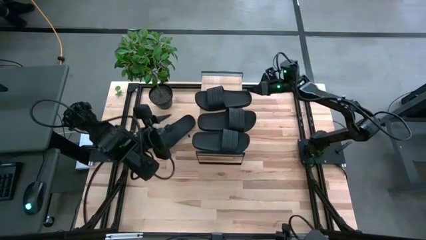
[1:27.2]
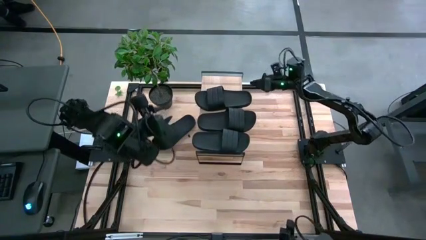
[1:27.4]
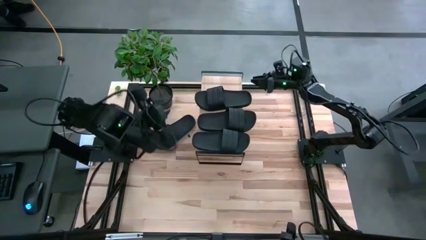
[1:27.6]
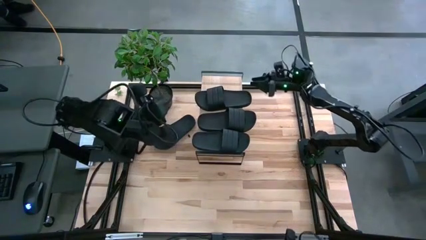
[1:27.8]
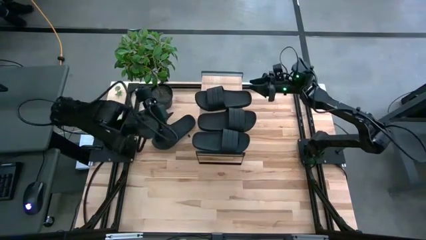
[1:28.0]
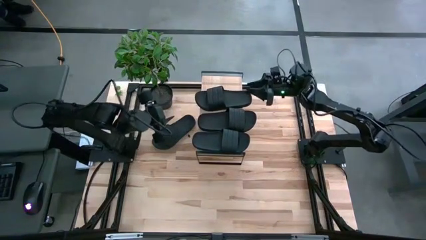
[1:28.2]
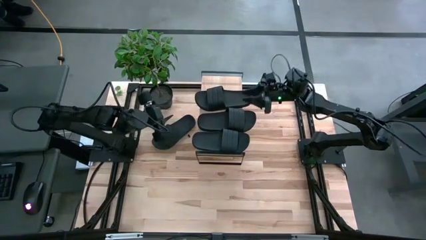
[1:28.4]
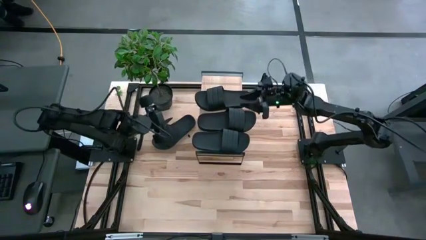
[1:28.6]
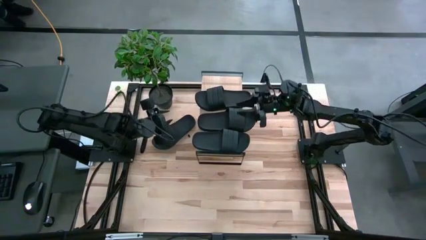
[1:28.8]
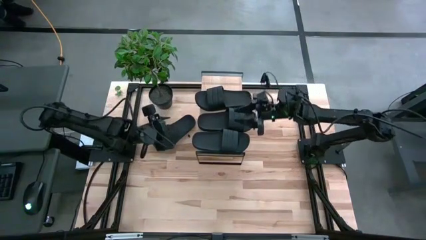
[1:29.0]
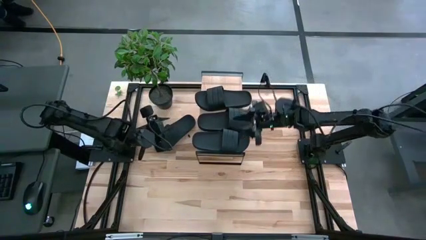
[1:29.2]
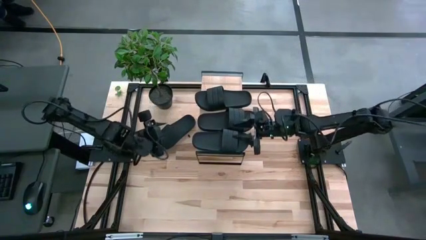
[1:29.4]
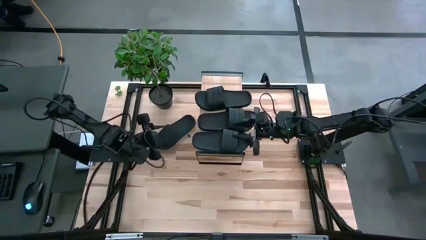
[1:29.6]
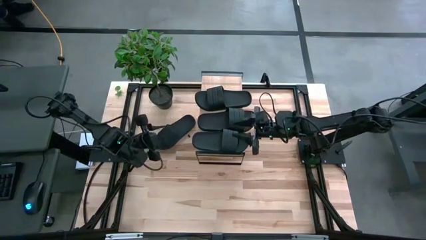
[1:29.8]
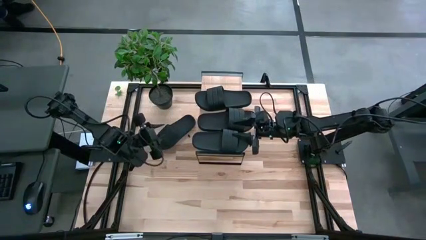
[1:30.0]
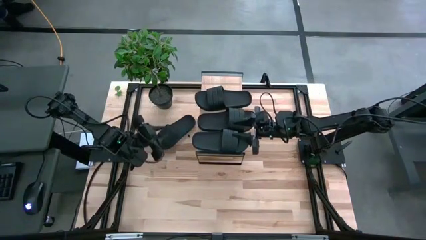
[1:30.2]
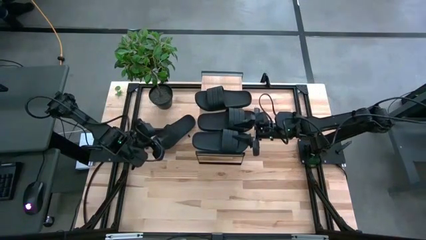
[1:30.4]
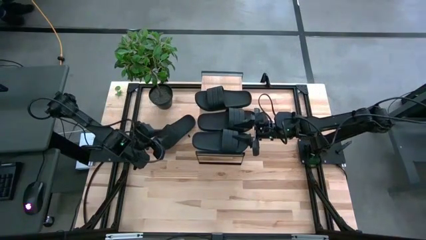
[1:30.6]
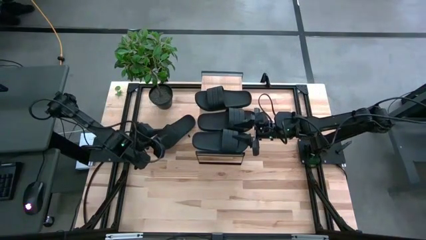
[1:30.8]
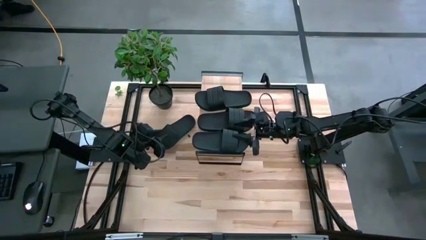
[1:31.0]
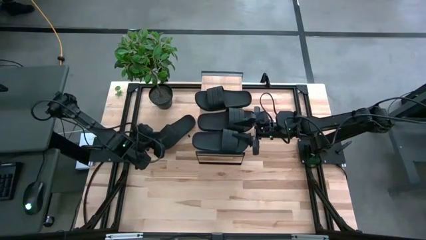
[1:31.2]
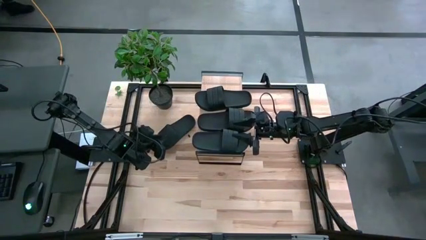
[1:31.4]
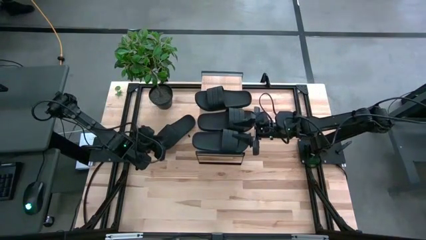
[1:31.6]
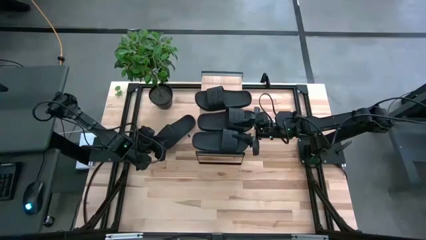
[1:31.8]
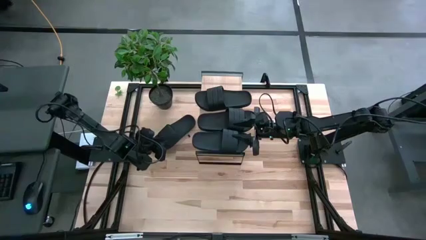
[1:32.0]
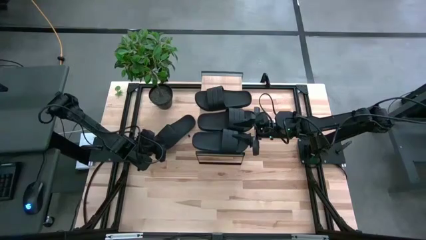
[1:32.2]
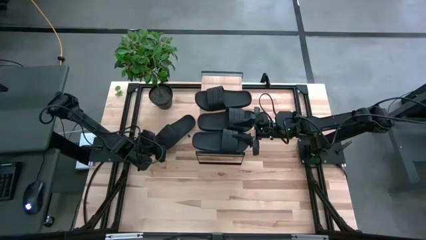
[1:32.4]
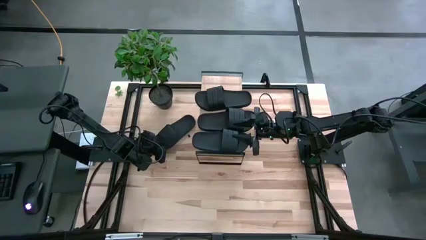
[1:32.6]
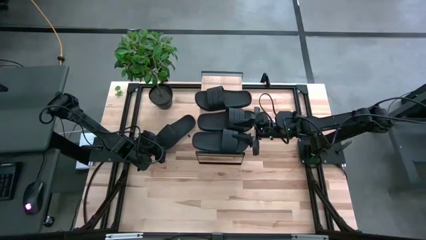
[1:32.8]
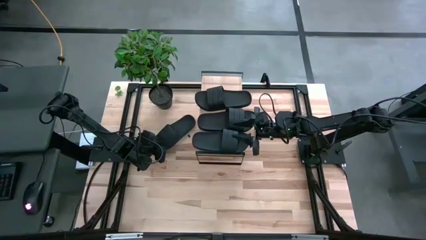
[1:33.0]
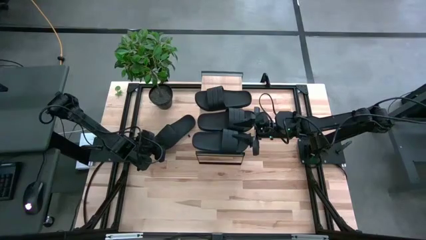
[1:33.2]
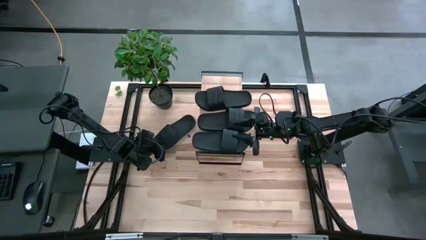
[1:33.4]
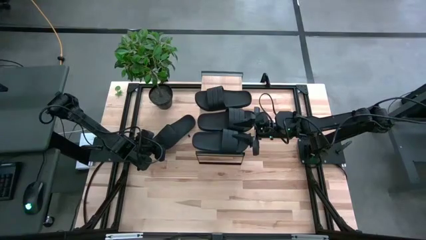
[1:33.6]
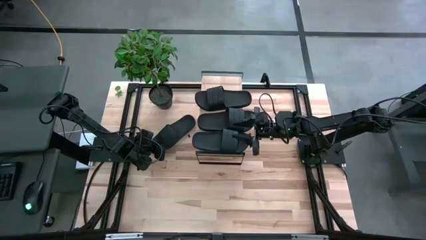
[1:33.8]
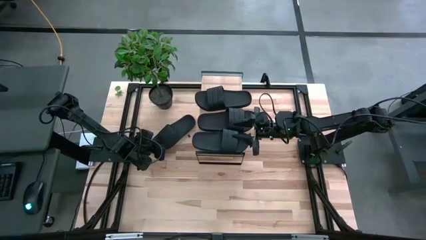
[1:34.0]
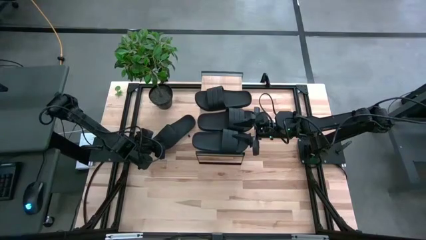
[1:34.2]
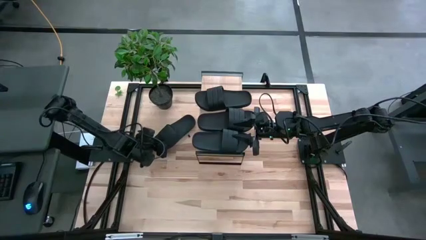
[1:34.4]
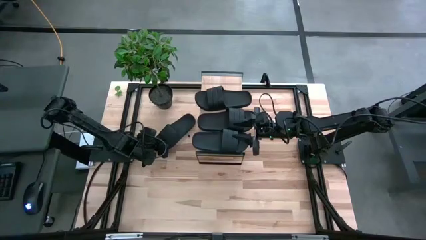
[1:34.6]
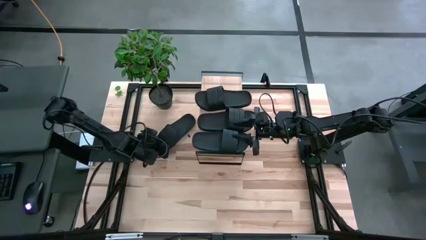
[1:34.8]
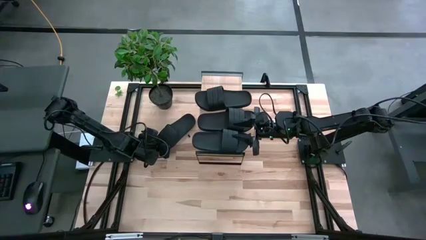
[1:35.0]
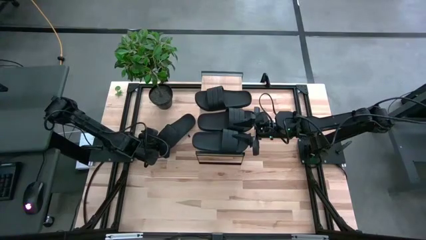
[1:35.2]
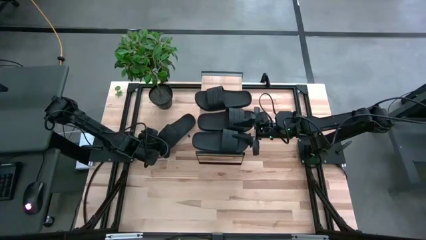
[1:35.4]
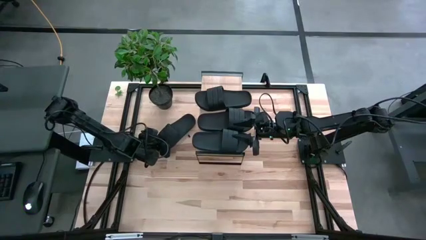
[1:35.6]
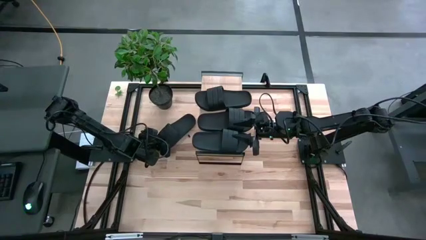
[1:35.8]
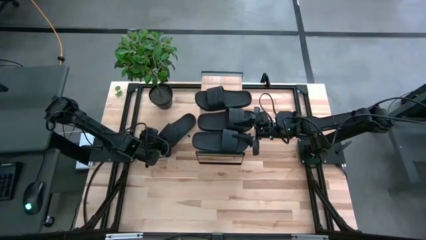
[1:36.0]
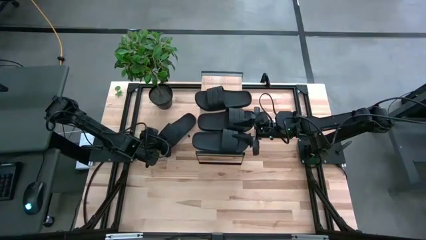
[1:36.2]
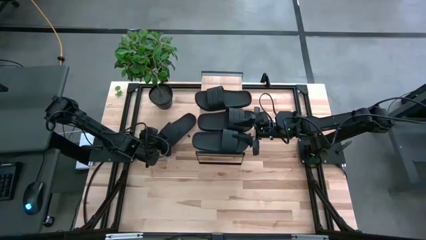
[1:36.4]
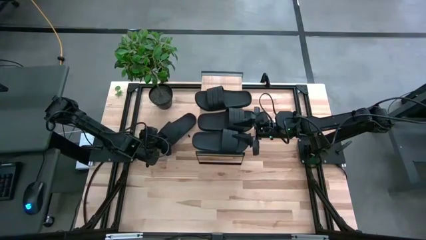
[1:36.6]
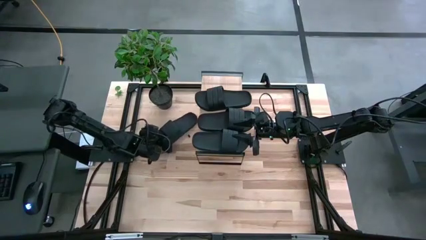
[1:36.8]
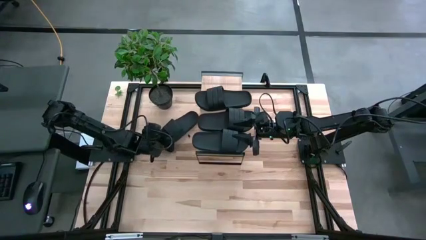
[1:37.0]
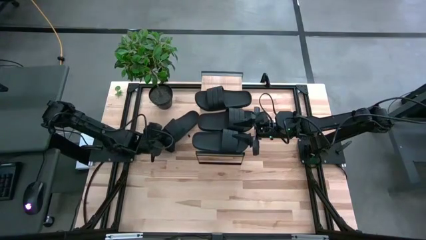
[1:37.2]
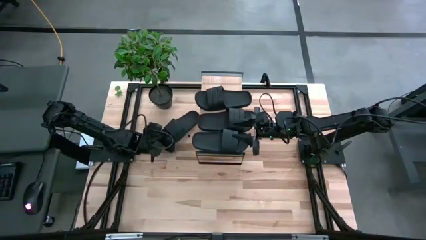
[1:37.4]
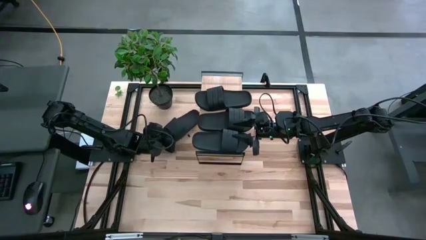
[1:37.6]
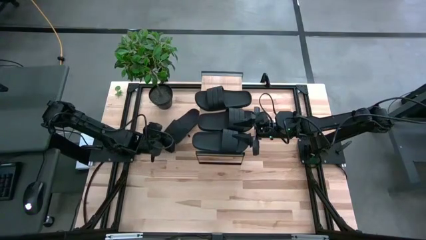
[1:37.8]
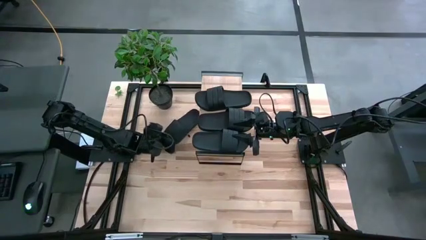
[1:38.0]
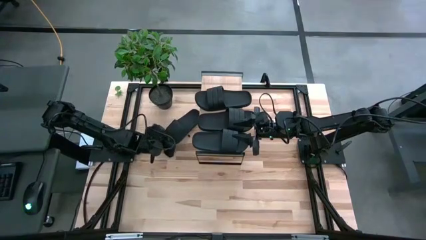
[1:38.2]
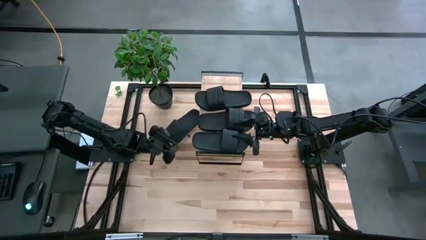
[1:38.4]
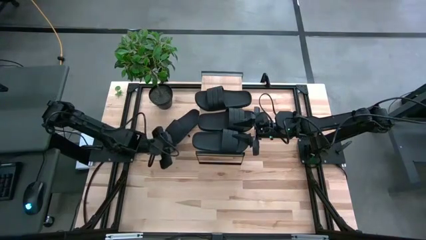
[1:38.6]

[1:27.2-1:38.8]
Task: Pick and place slides into the shelf
Put the black slipper on the shelf

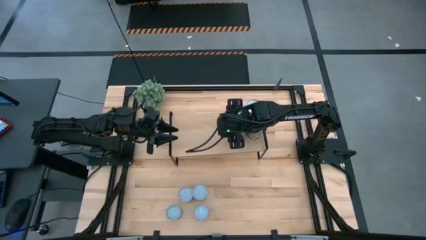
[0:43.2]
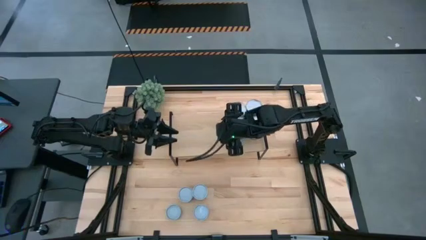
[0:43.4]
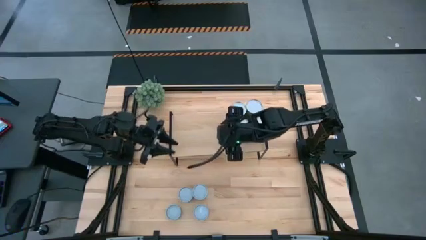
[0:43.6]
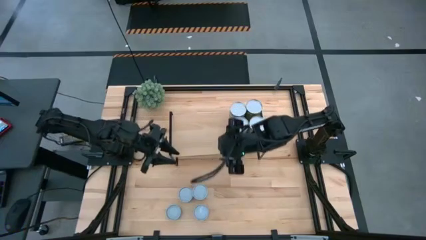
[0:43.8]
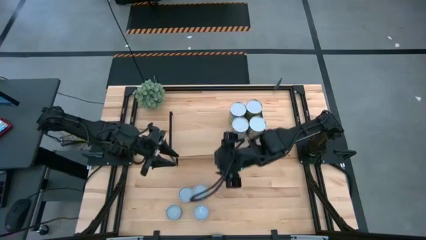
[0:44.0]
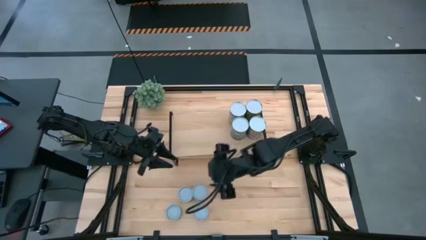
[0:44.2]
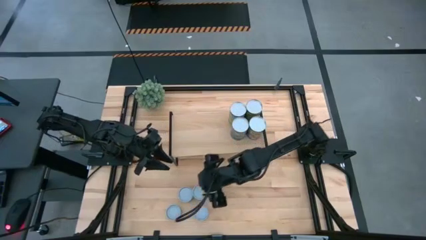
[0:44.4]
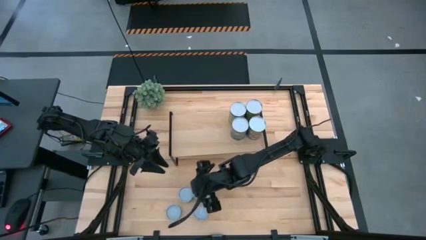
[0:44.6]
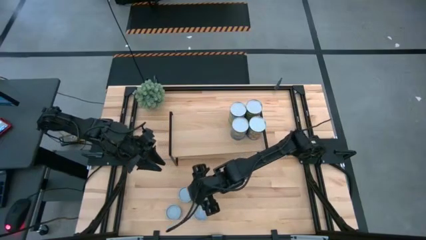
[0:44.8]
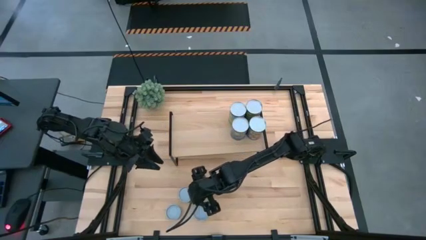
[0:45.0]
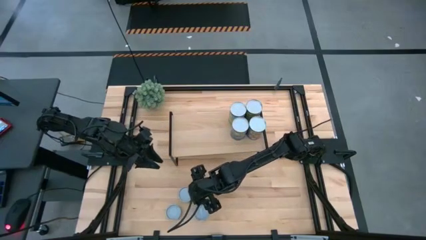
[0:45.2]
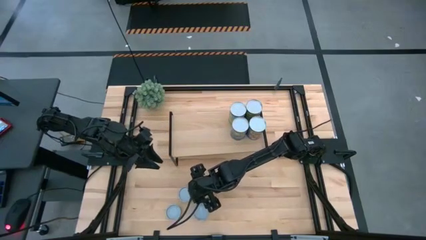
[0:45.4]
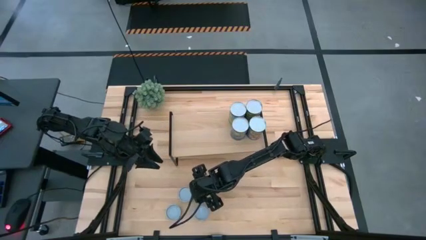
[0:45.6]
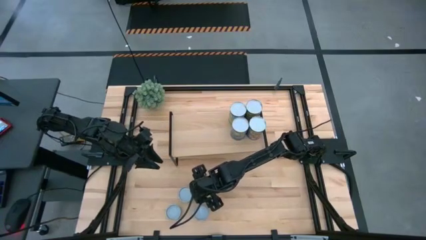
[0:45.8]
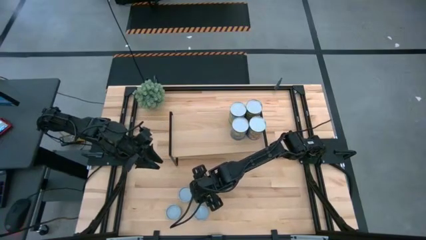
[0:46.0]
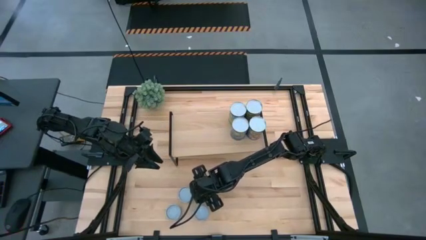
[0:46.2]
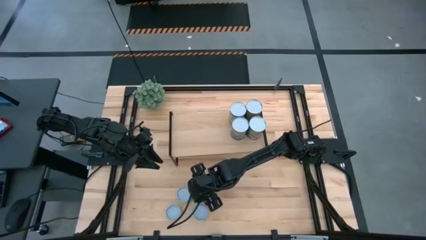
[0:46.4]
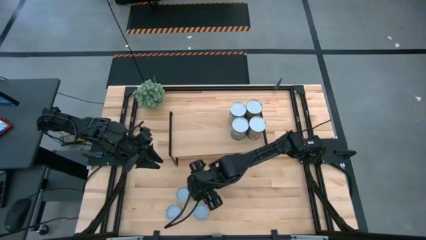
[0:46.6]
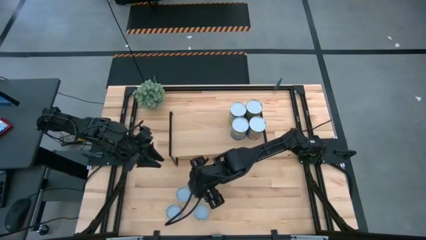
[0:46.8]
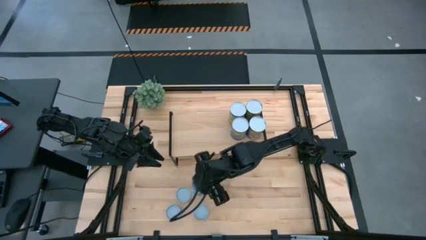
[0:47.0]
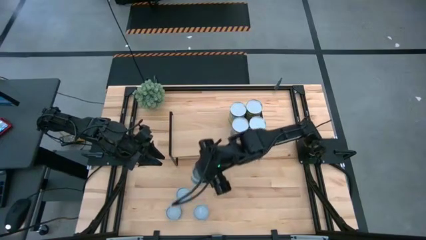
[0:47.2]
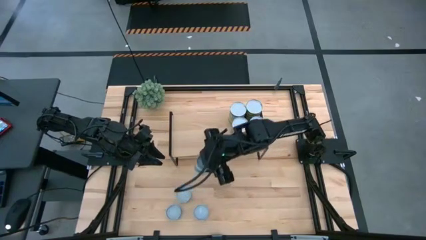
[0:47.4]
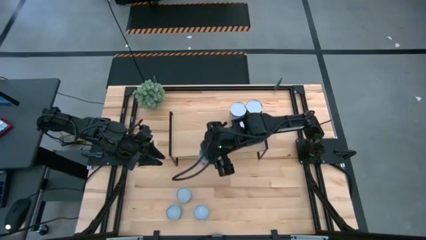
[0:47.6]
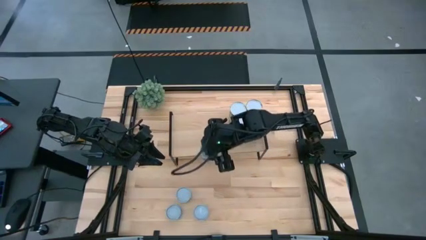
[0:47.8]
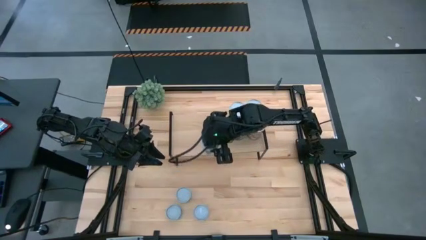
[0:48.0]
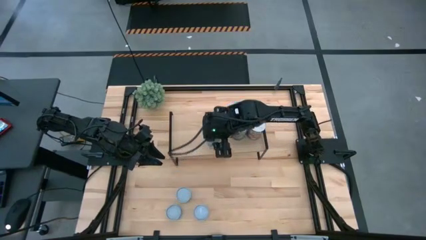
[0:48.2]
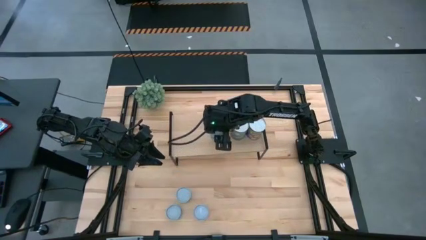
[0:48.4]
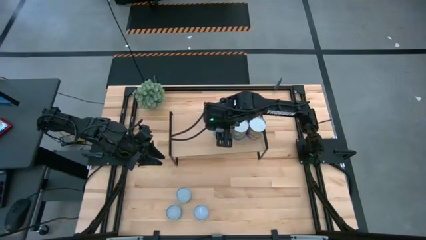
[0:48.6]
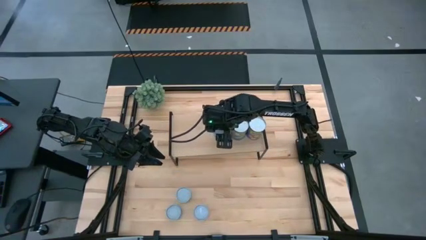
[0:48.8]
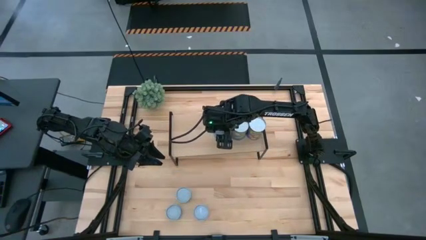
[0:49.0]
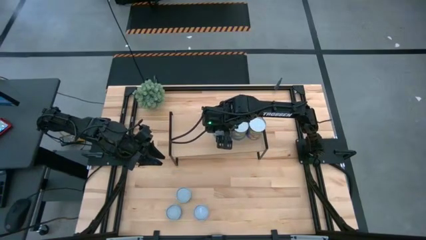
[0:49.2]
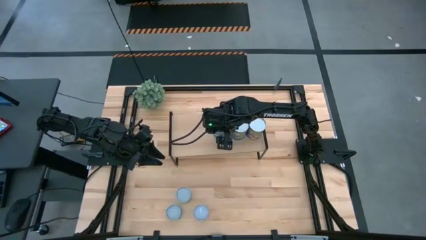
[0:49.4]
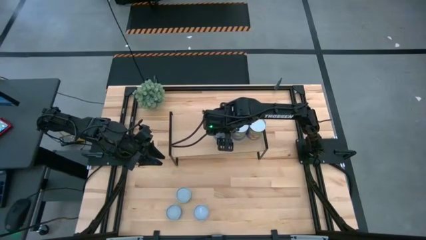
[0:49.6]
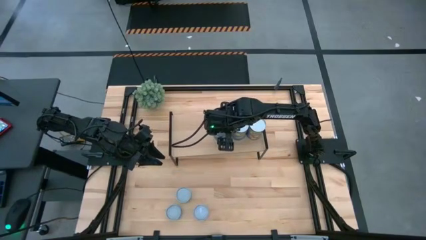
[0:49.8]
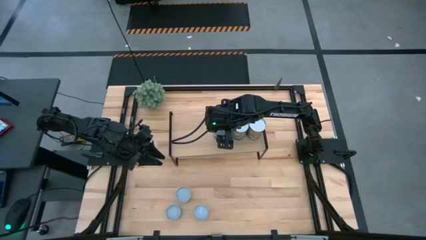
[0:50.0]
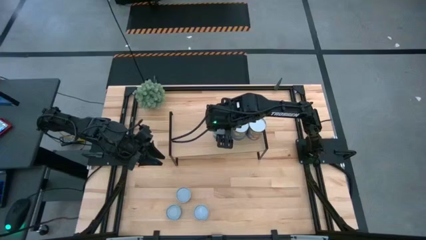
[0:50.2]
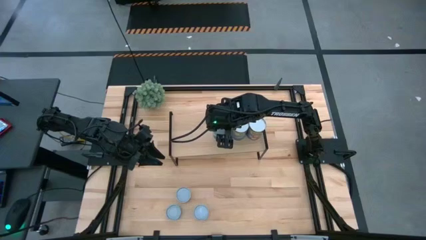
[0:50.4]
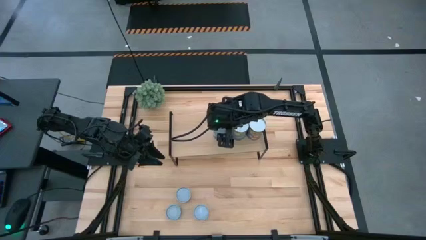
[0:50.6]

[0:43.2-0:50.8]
Task: Pick and place cans onto a shelf
Put the white can on the shelf
